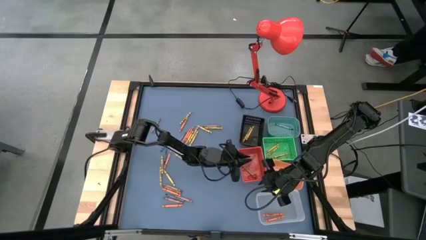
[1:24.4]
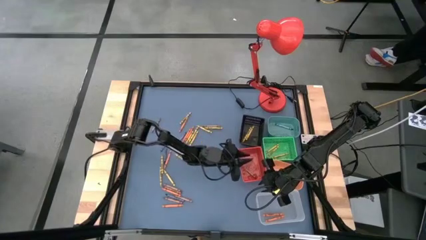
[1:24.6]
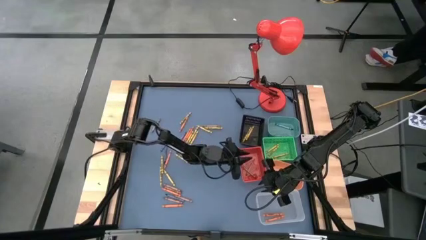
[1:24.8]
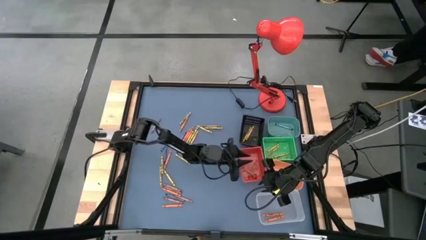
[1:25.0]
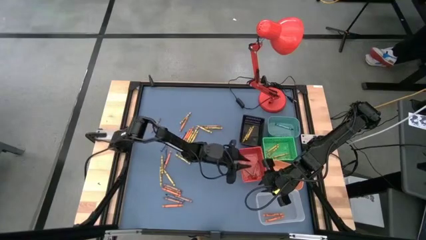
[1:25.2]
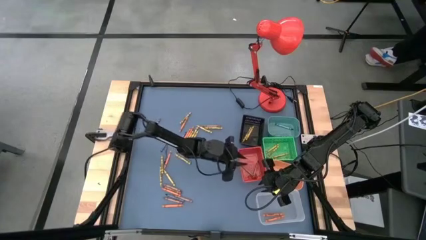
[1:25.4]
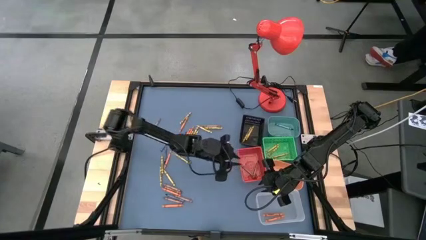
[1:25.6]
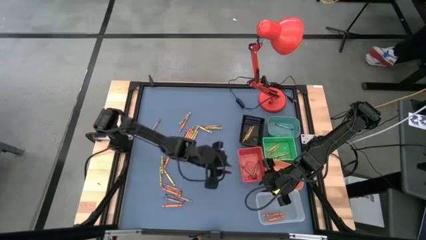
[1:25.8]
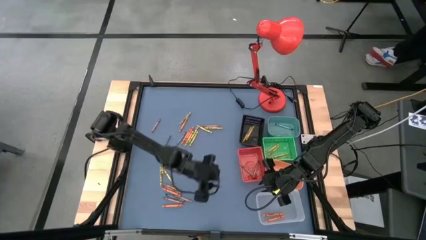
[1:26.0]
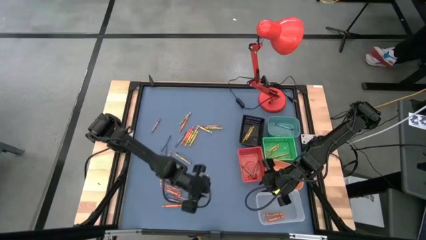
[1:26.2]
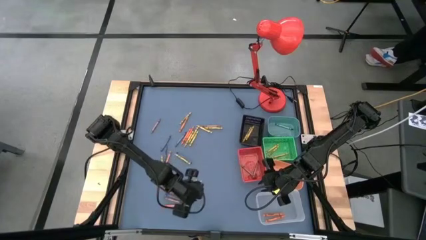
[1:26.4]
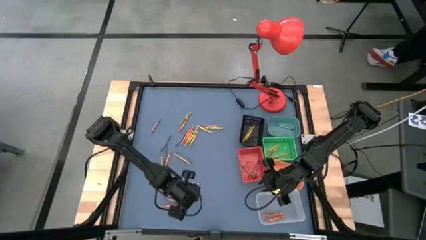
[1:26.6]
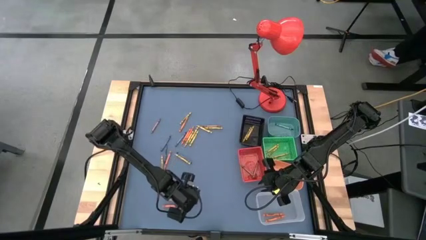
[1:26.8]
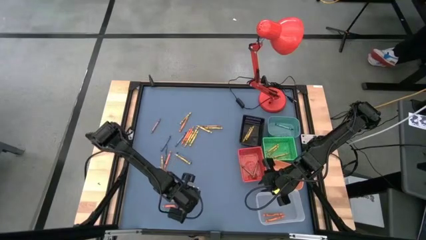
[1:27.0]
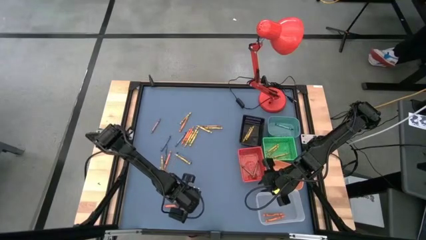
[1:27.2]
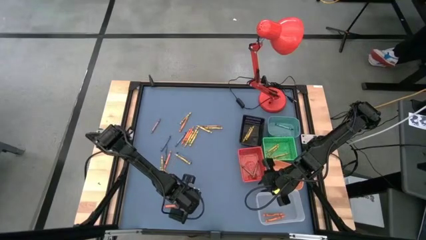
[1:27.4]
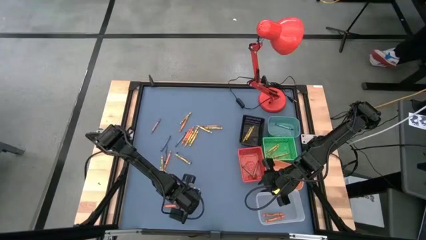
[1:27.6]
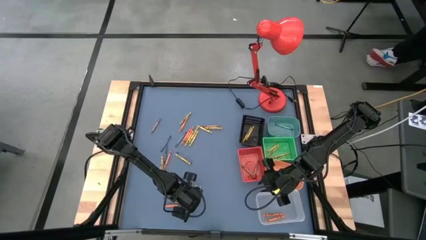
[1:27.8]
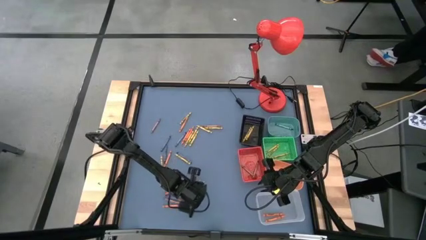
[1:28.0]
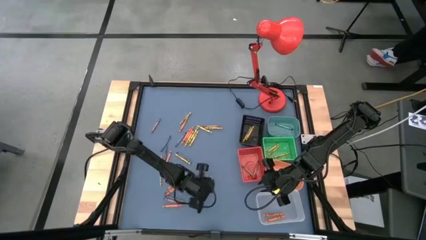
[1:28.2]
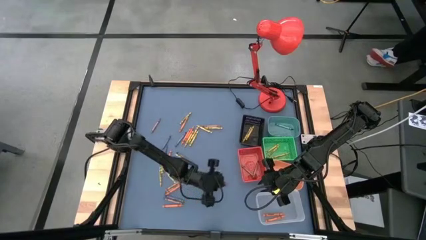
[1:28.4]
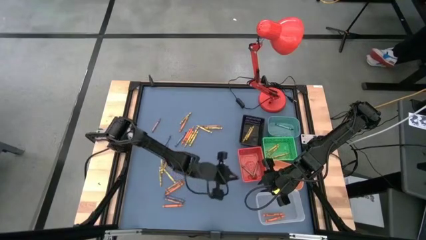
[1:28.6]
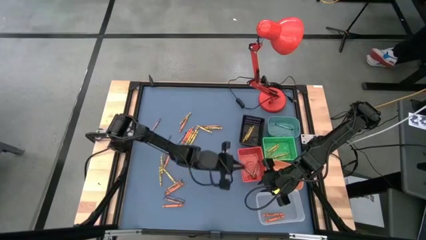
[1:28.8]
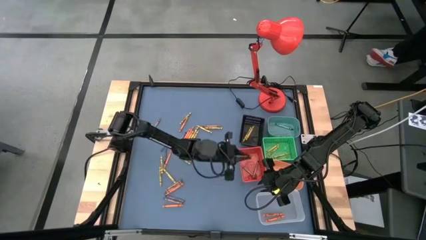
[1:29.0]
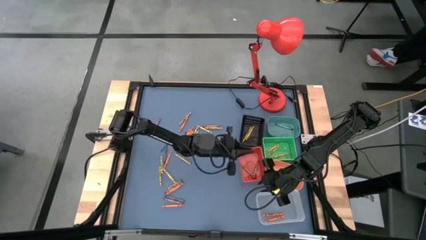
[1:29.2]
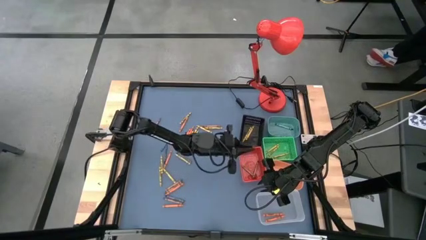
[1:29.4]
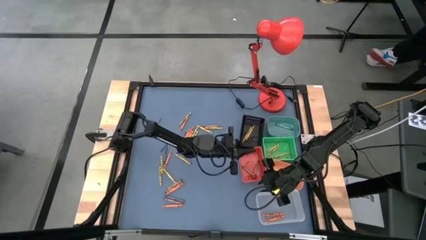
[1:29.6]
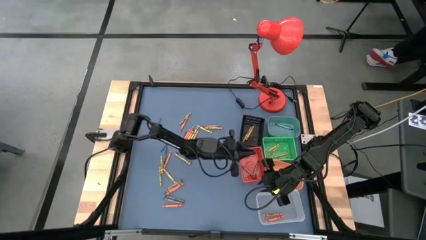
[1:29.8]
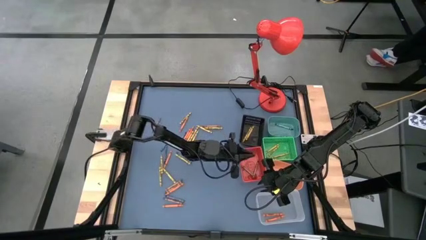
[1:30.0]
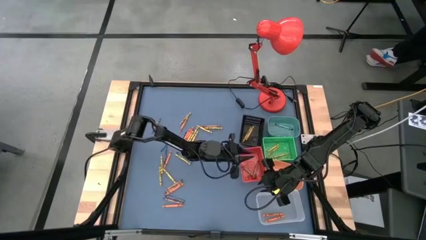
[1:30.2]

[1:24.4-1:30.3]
Task: Sort crayons
Put the brown crayon into the red basket

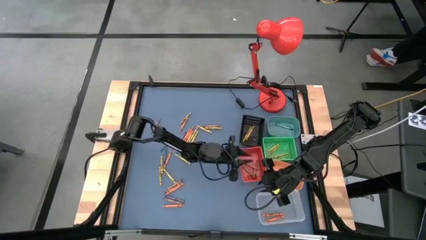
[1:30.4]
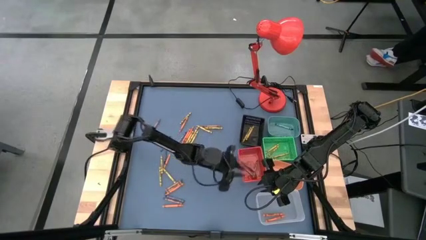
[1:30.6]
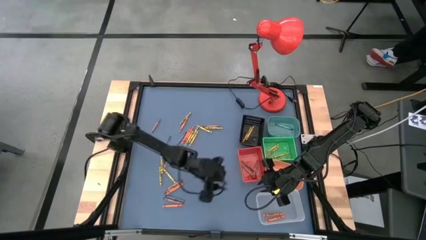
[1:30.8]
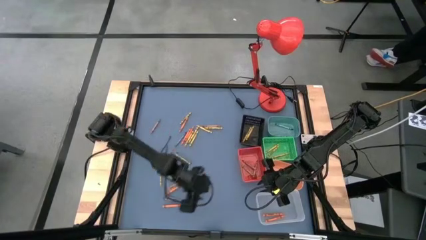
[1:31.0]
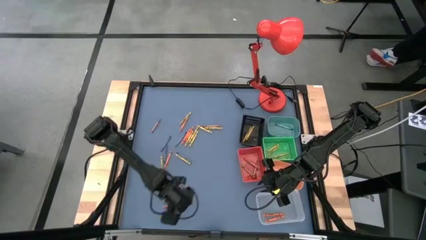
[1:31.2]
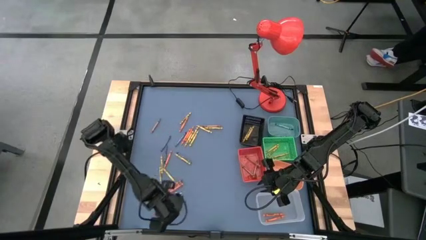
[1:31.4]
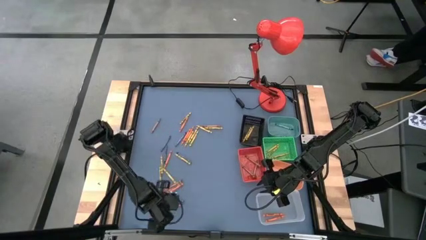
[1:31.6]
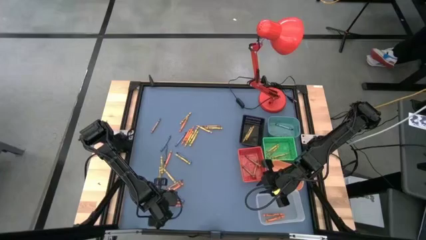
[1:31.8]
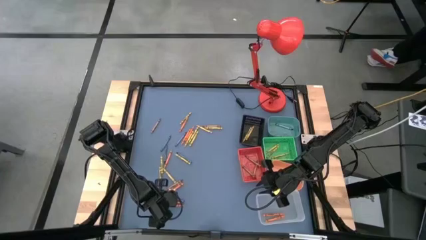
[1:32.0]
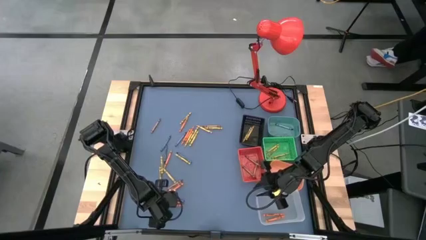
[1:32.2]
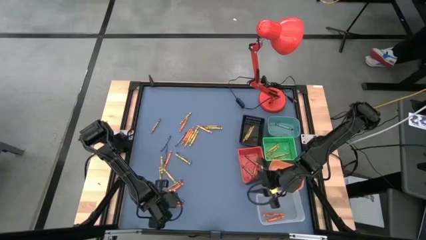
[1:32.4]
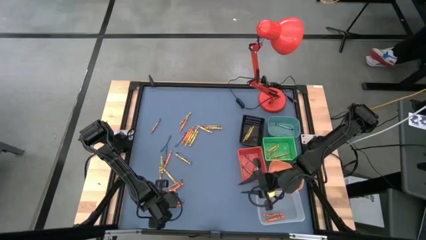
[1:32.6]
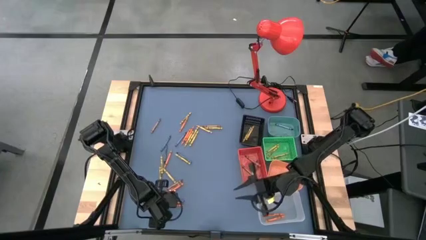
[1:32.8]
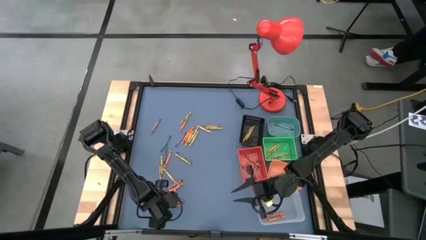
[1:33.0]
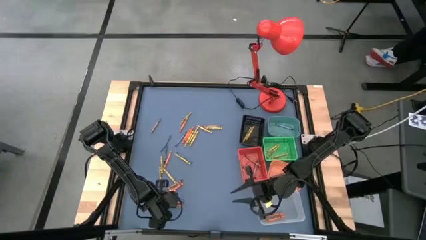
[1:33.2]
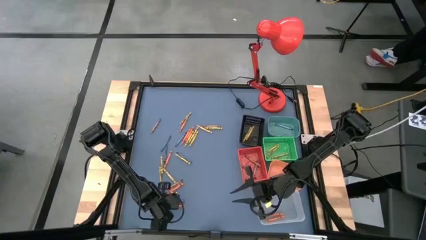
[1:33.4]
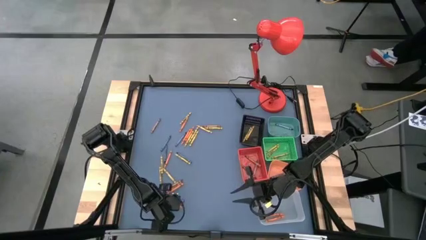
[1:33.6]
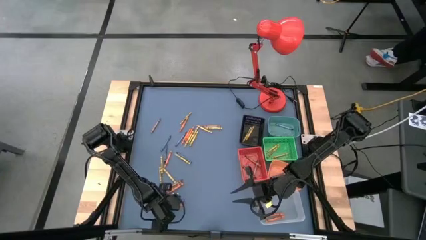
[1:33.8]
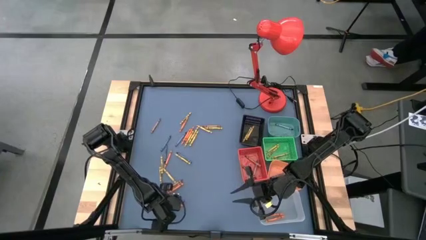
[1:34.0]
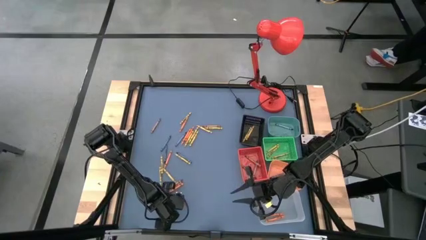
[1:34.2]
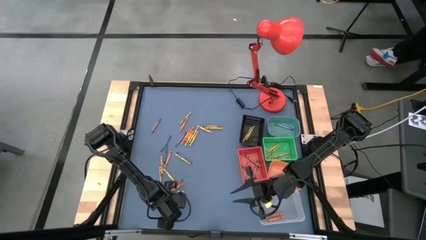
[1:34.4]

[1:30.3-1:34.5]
Put the orange crayon into the transparent bin

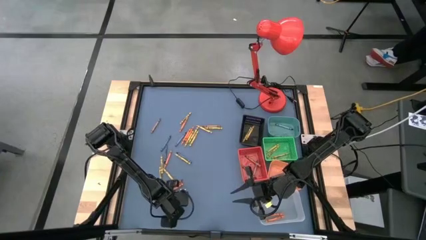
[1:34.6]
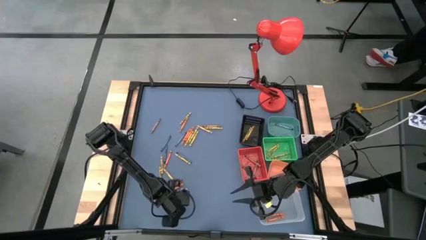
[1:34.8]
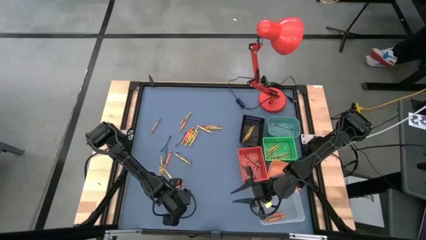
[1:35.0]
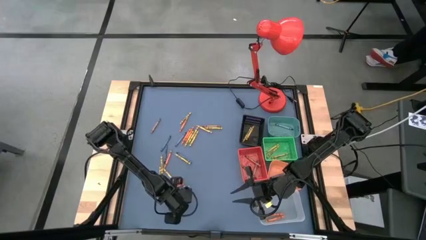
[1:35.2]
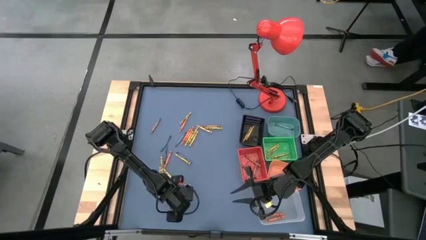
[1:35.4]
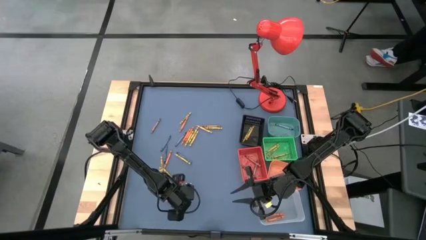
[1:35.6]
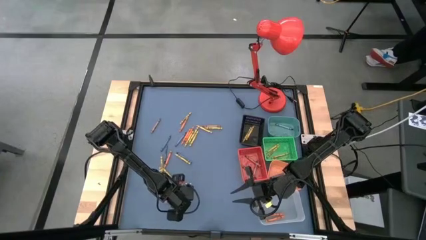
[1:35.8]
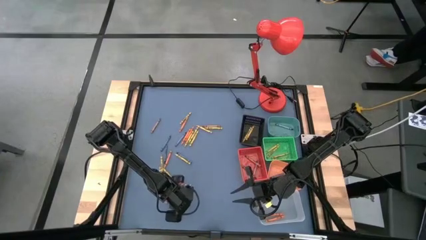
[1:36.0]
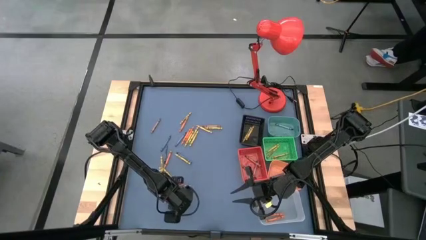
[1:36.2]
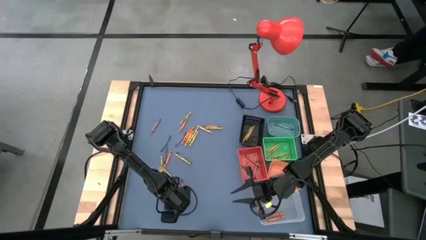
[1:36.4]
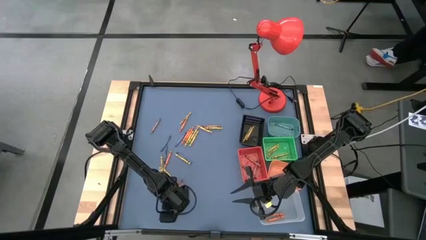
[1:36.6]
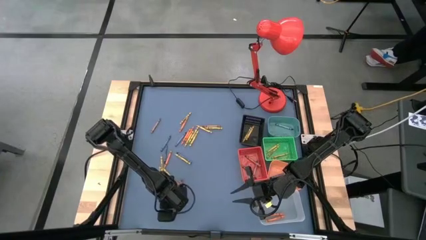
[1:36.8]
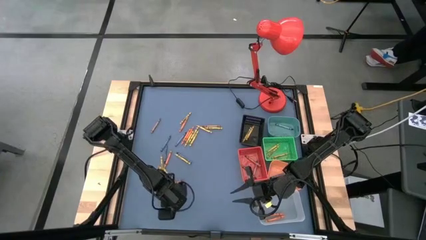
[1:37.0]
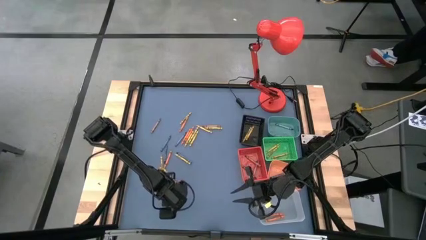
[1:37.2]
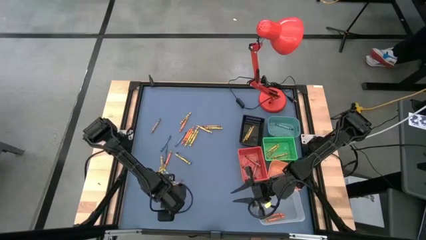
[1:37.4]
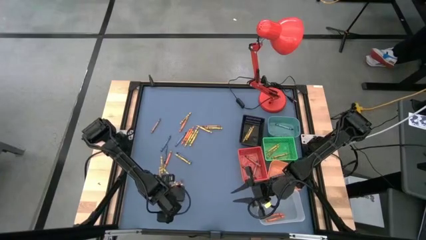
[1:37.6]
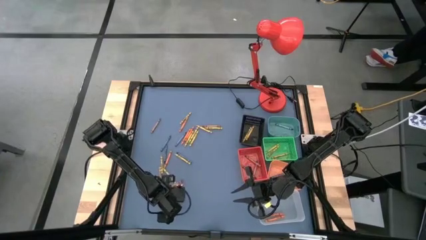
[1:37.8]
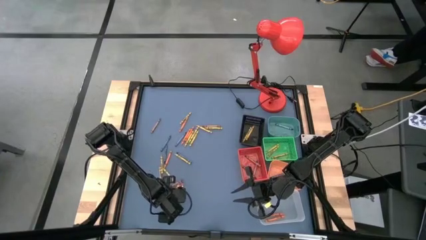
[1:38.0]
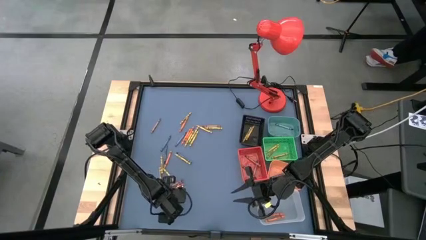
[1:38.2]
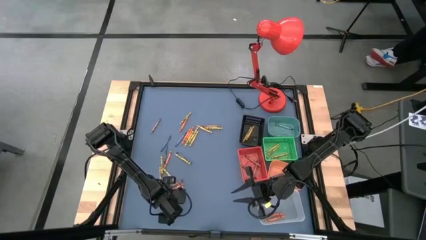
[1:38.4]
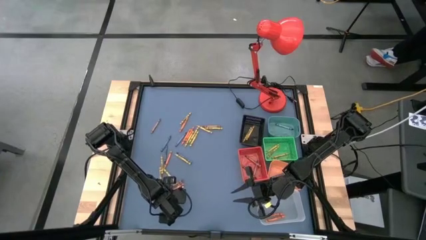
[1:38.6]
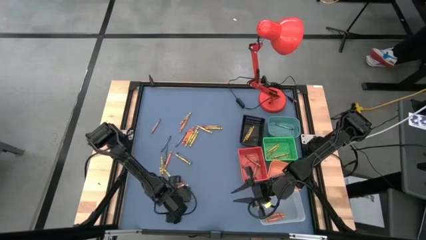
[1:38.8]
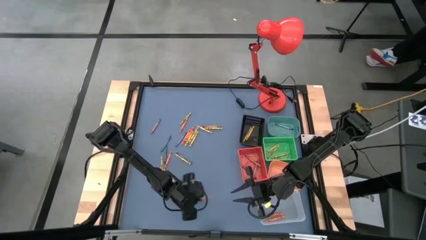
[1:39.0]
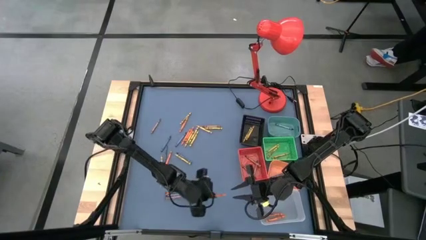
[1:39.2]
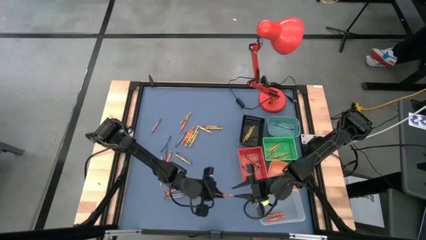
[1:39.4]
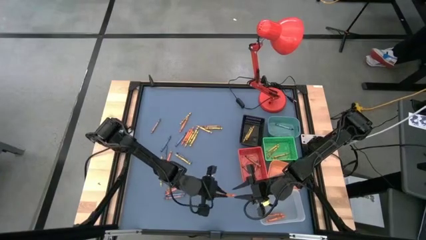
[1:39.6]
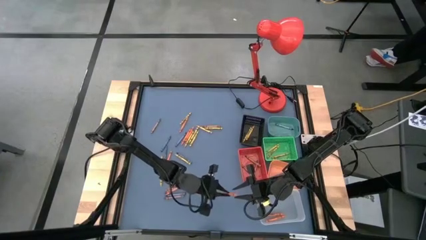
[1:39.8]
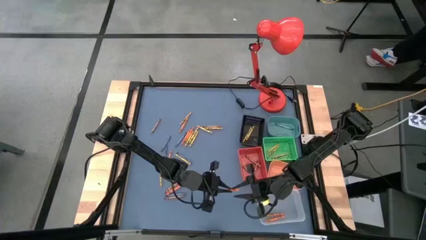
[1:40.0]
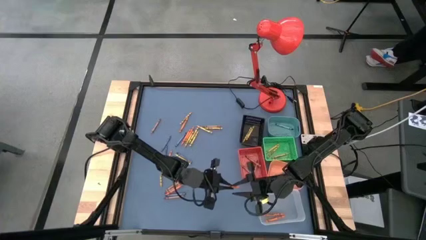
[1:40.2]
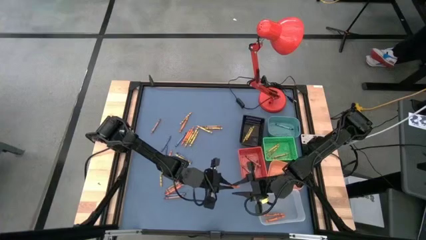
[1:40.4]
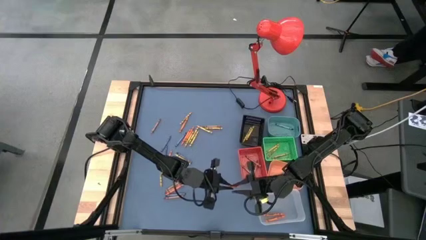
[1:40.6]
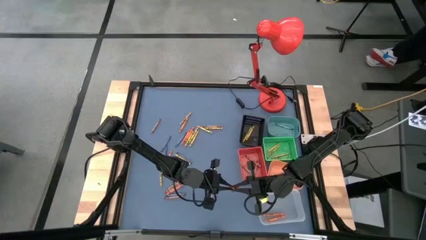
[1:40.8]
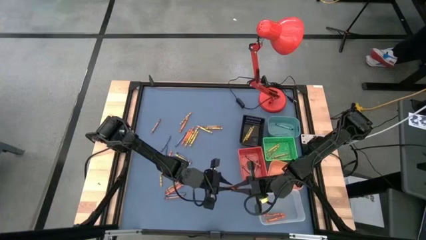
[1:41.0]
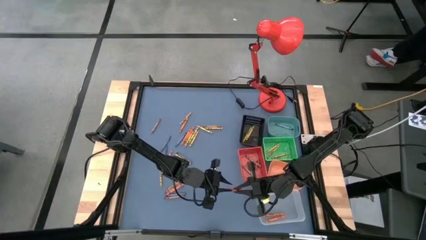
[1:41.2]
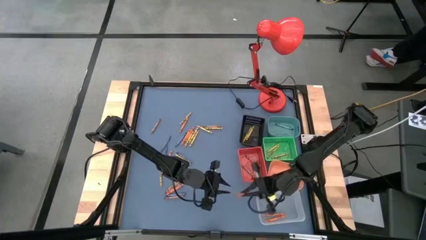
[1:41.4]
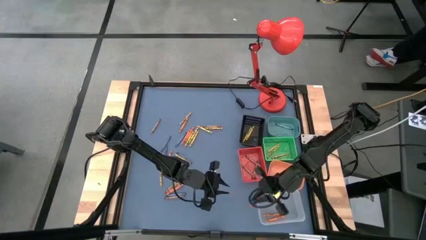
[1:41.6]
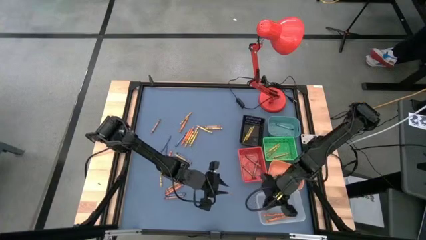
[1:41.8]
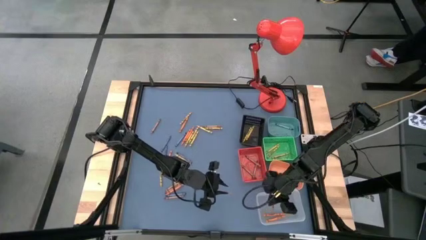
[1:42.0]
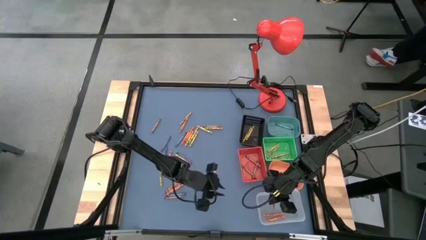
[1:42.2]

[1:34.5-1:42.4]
Put the orange crayon into the transparent bin
